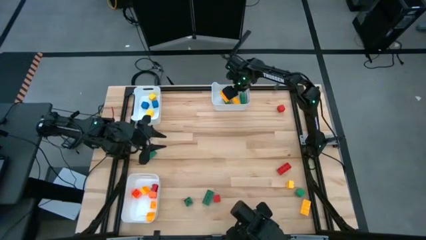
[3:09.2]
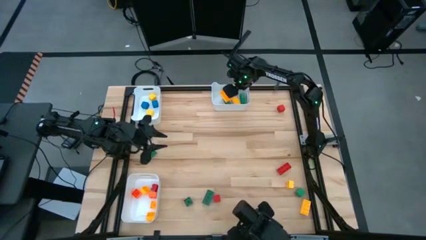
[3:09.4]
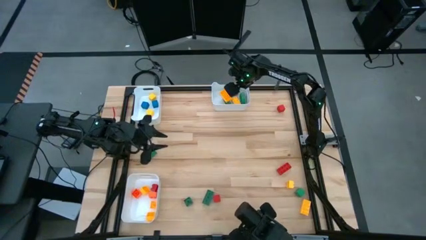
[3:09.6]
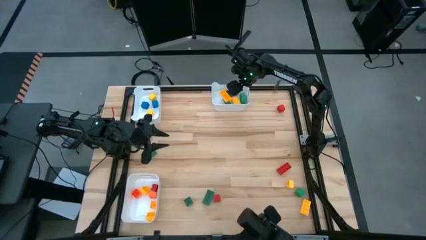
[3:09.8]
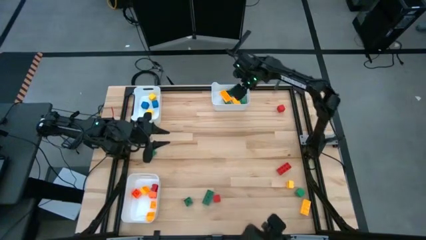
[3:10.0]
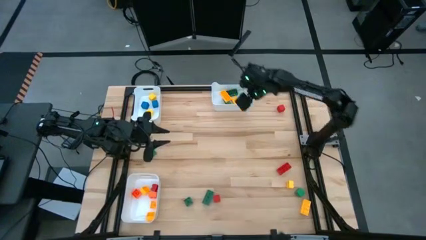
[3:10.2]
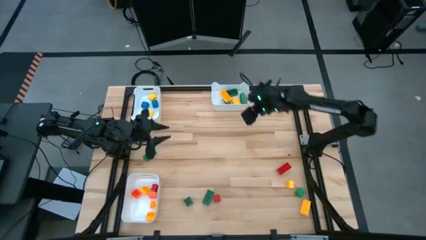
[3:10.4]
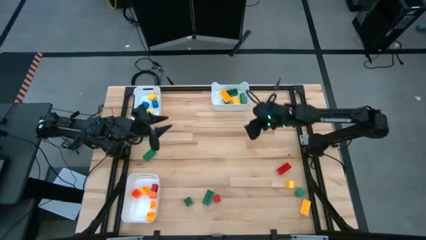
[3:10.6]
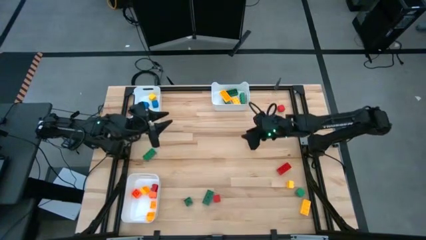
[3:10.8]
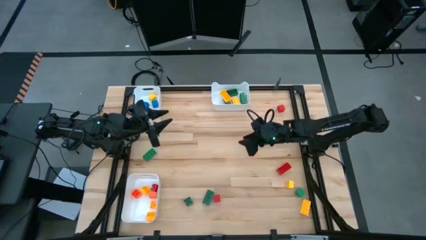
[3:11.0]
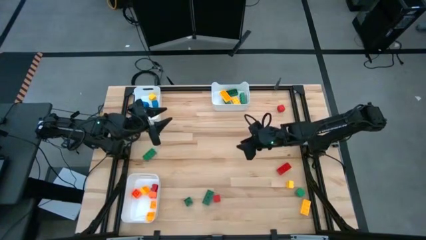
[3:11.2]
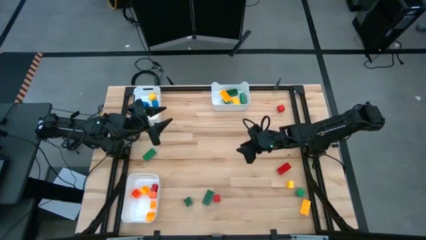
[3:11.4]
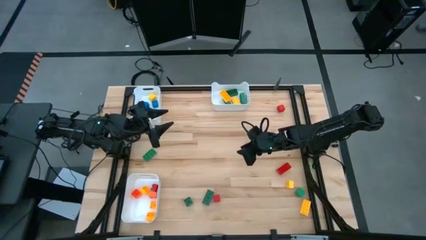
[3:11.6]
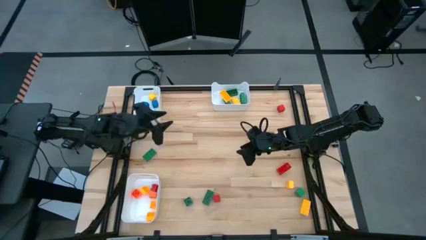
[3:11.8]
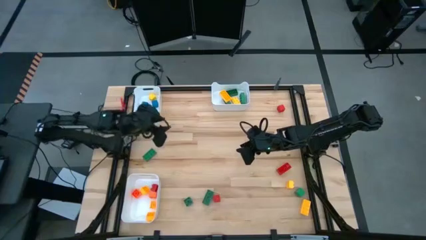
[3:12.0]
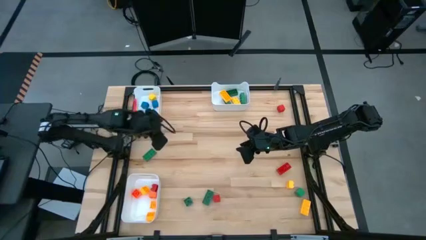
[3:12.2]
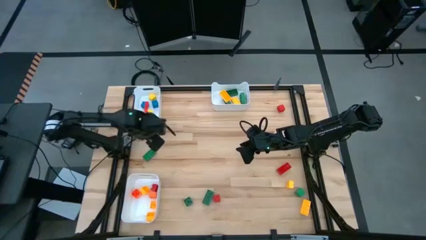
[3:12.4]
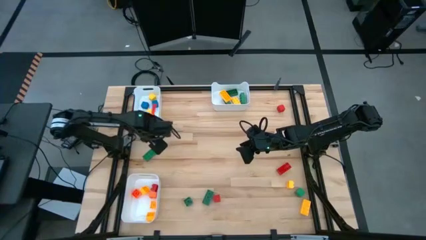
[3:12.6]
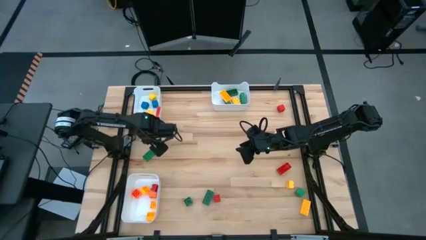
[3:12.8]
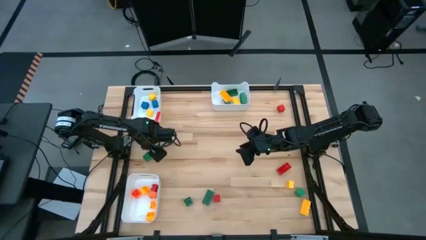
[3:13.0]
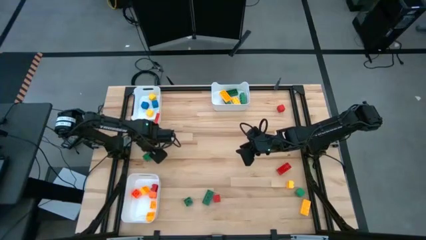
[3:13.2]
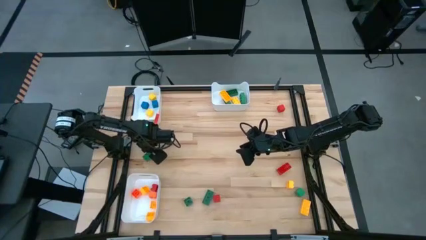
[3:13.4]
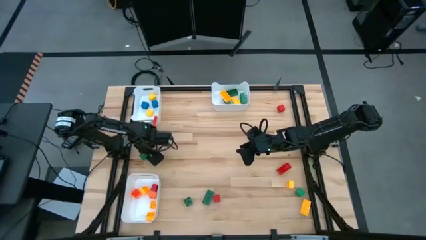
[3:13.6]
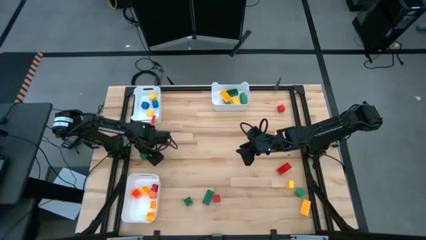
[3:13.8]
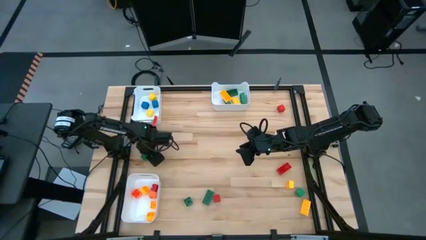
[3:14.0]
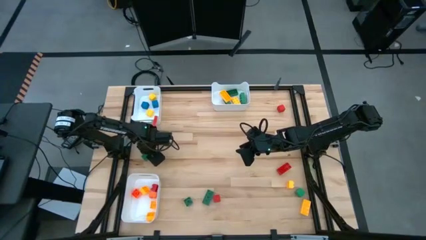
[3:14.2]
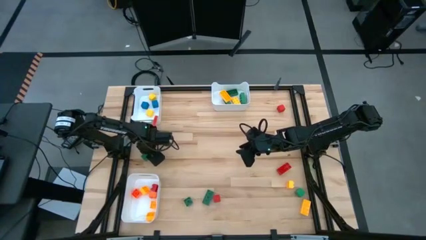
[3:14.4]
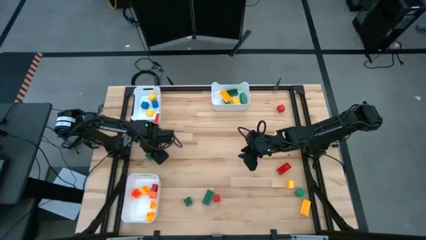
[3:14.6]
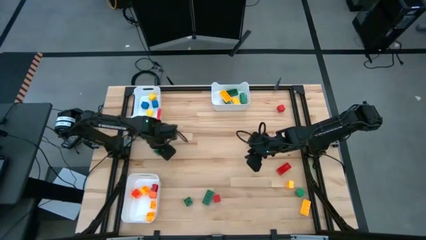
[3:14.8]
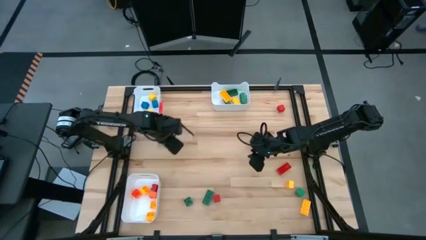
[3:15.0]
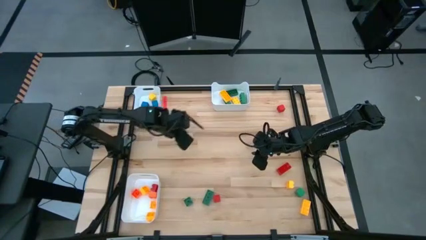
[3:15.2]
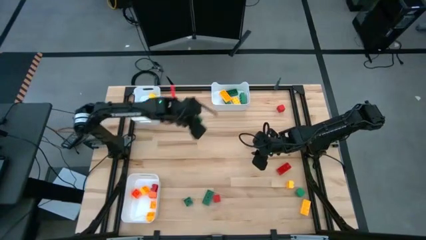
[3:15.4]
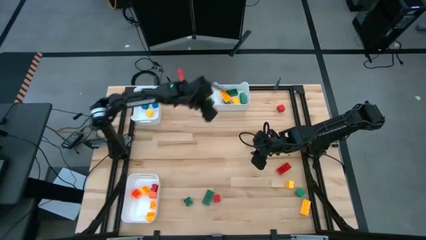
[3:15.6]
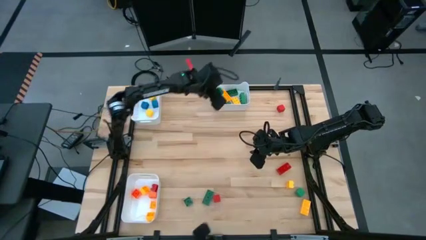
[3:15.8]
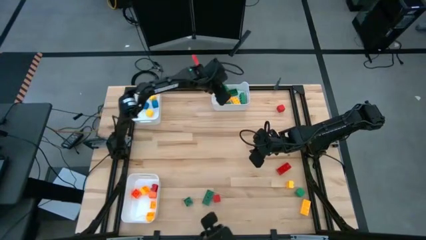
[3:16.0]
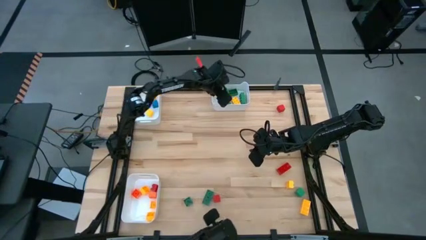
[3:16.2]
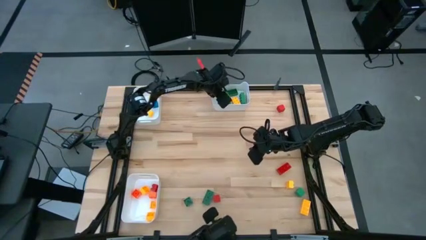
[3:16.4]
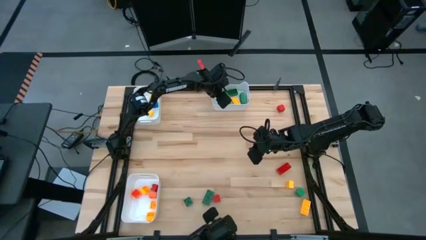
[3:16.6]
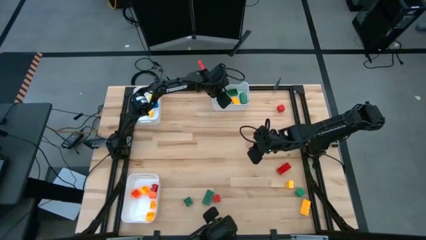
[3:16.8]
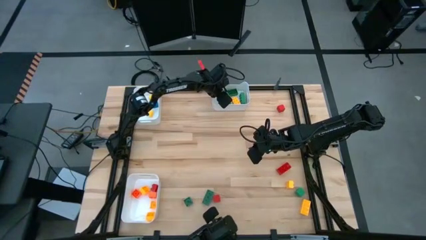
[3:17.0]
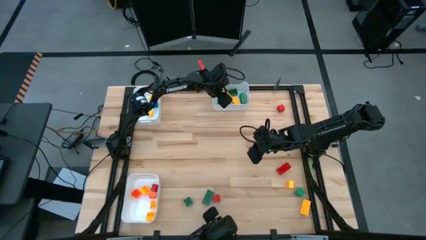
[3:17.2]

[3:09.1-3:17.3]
Task: Sort blocks by size
Put the green 8 stud game piece into the top right white bin

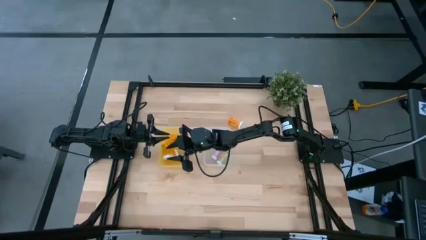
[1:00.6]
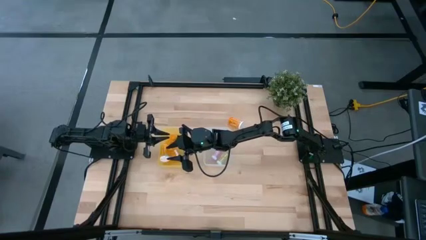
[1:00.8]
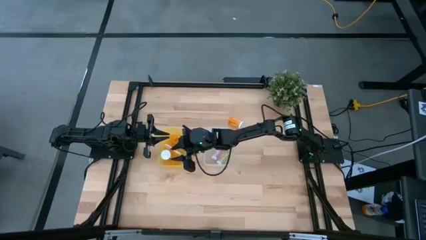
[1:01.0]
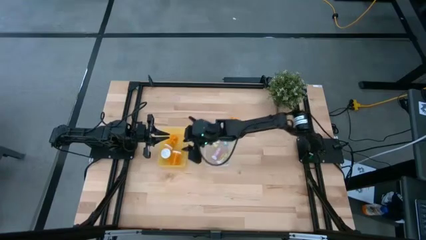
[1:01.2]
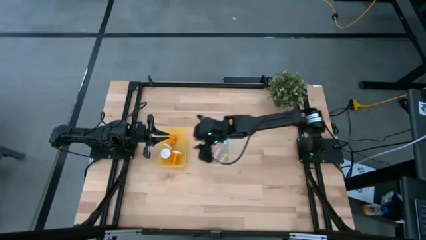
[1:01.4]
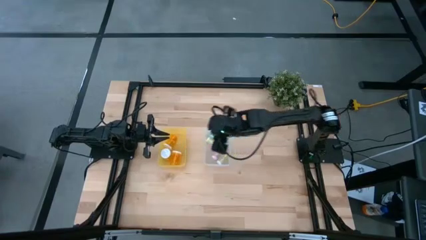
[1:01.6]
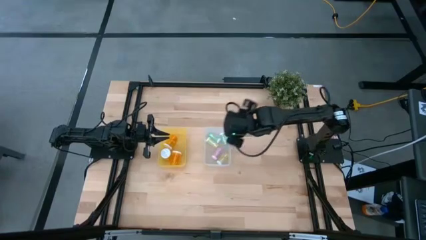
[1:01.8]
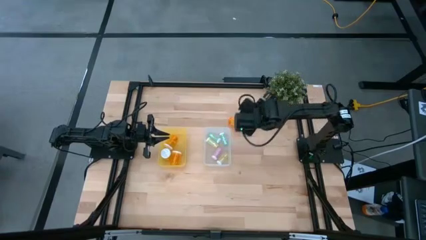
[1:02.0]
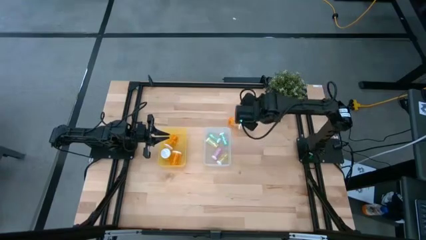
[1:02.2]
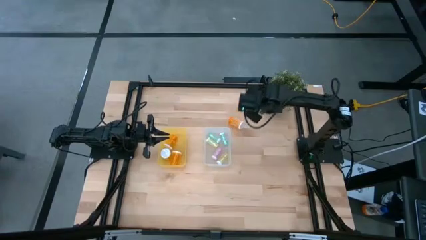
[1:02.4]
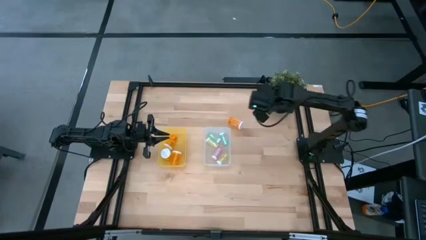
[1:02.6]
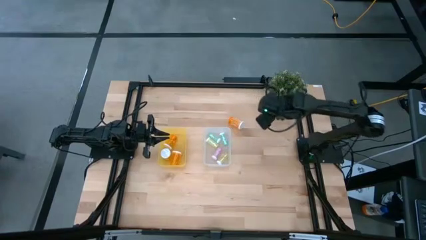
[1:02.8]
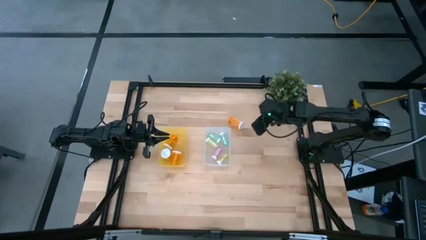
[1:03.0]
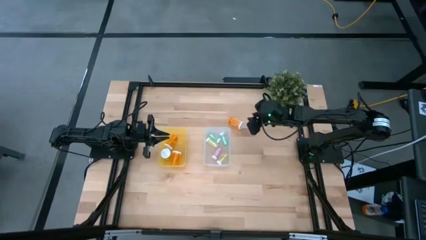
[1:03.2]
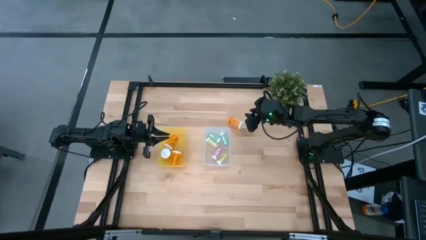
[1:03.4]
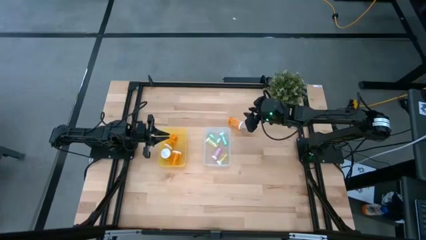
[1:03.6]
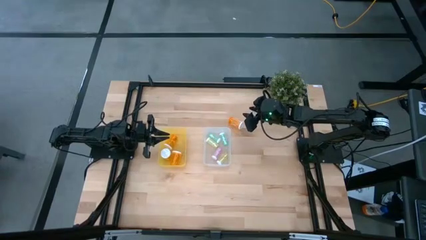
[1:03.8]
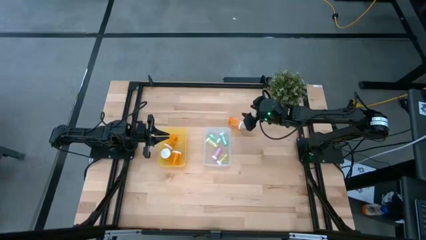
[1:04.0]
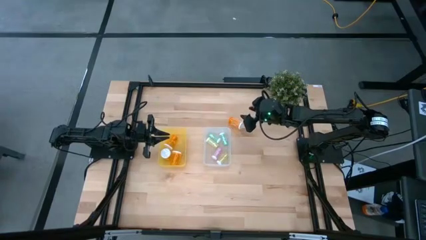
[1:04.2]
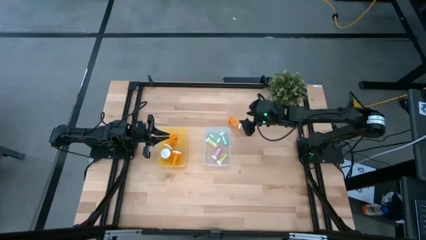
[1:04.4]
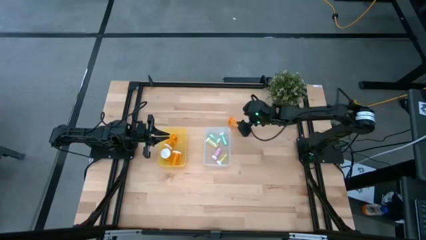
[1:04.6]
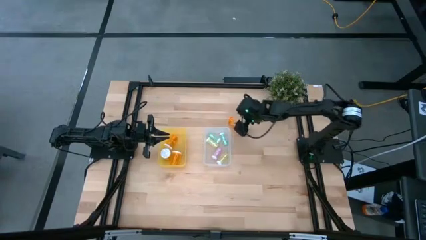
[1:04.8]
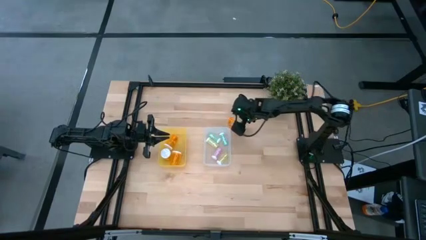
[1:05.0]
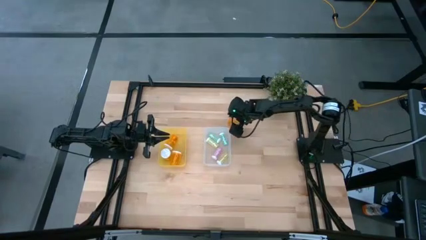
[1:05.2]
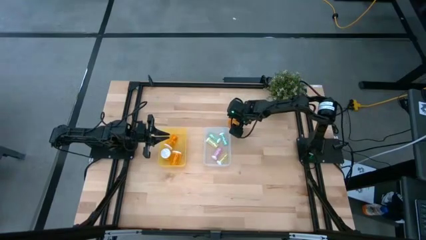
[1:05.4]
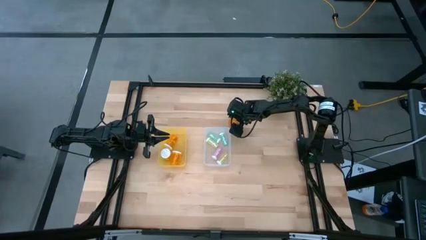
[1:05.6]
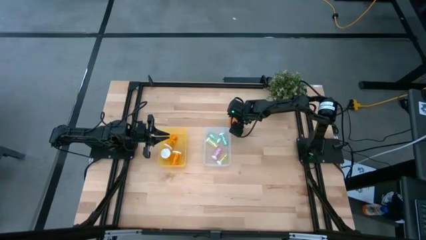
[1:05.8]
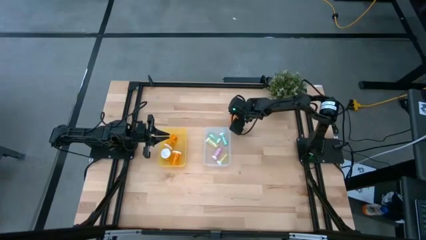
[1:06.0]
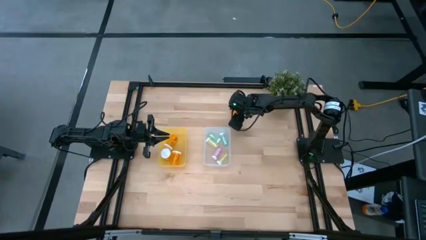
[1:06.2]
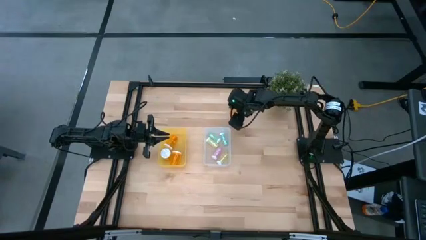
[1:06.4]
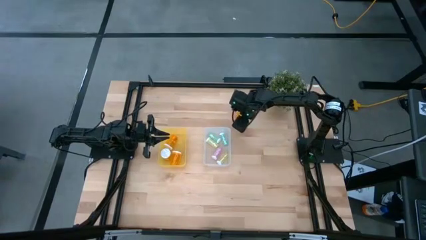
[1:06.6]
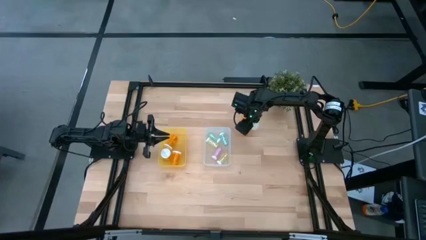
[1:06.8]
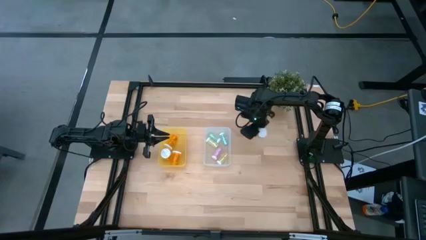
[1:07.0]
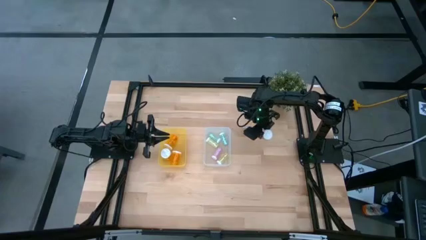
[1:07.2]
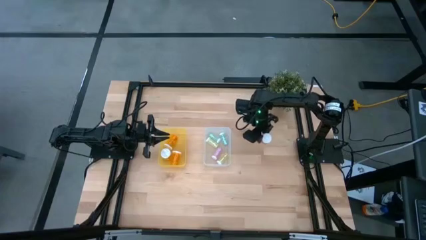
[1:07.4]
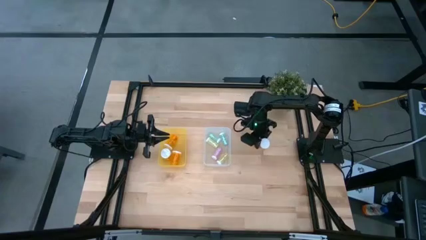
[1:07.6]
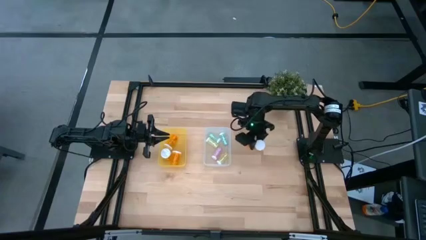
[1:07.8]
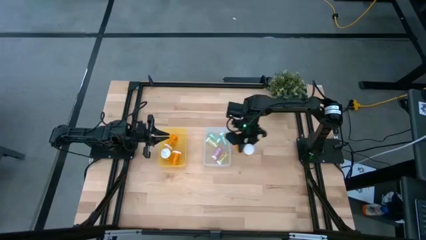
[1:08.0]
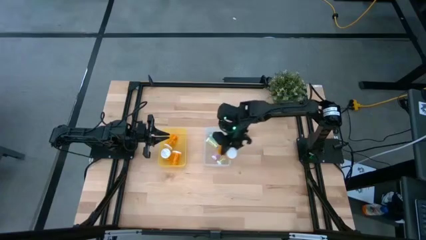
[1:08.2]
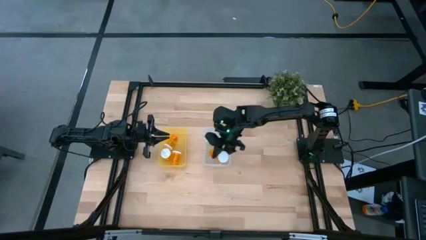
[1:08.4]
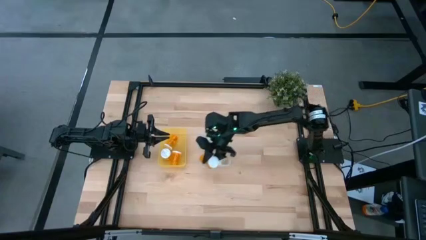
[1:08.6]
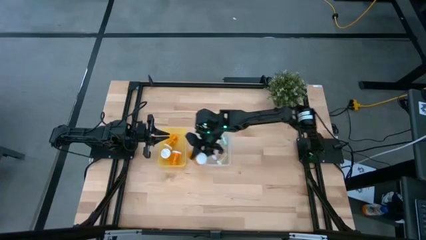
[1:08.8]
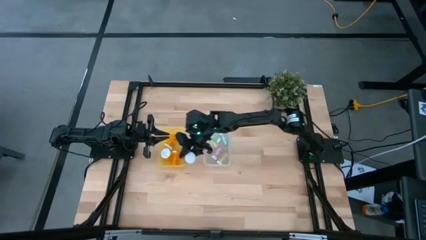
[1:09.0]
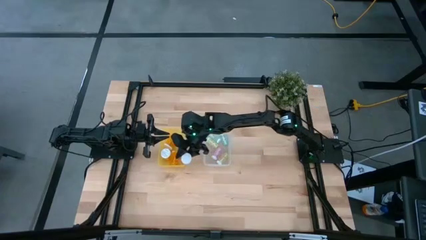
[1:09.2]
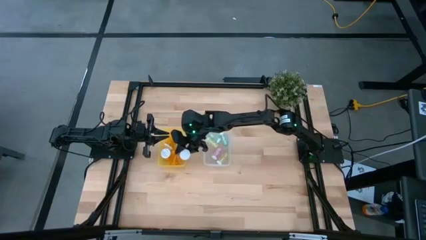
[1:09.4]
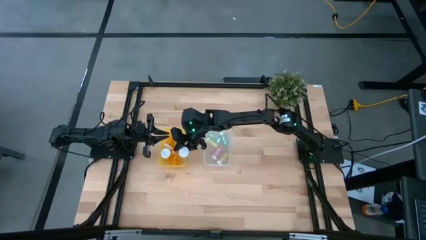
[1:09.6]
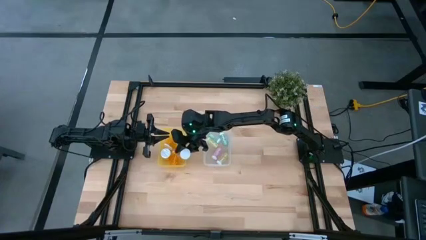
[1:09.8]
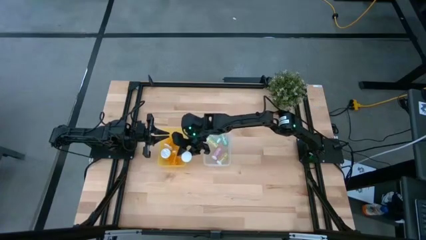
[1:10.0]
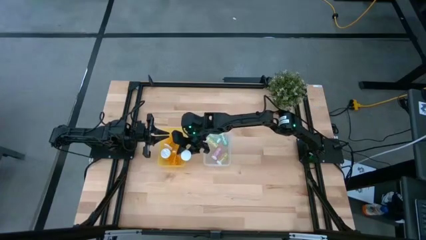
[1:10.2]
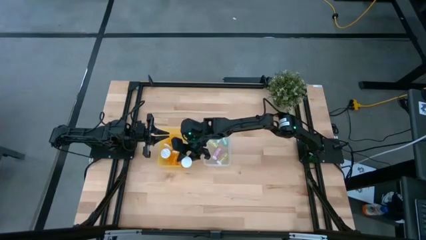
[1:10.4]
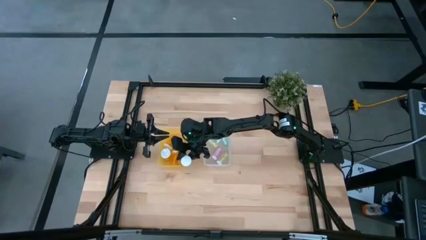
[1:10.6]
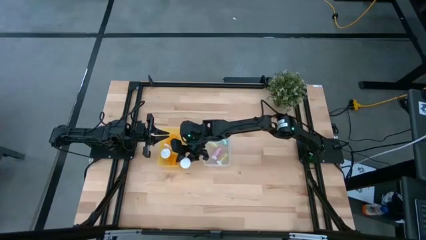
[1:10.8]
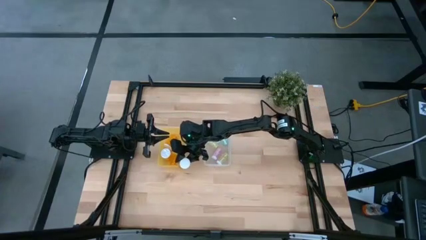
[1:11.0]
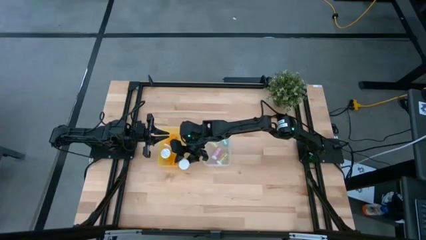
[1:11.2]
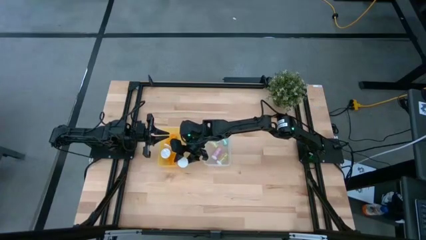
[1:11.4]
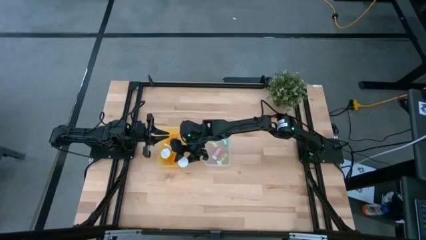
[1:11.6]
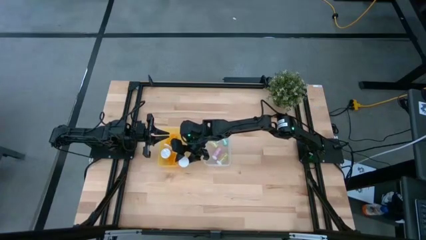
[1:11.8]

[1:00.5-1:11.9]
Task: Pick and place medicine bottles into bin by pill shape (circle, oval)
Put the orange pill bottle into the yellow bin
